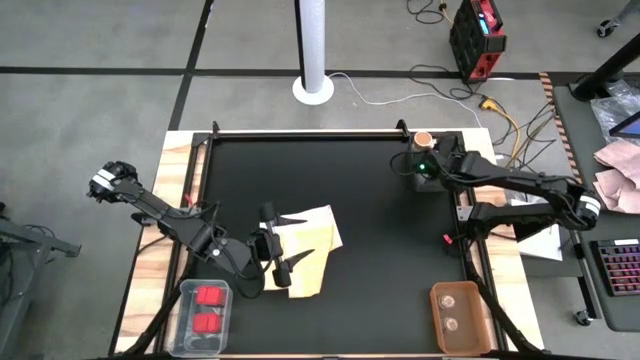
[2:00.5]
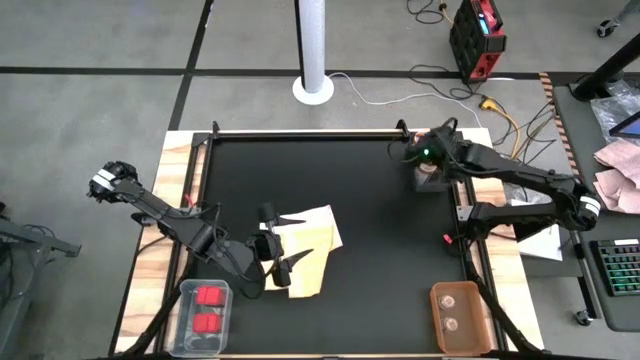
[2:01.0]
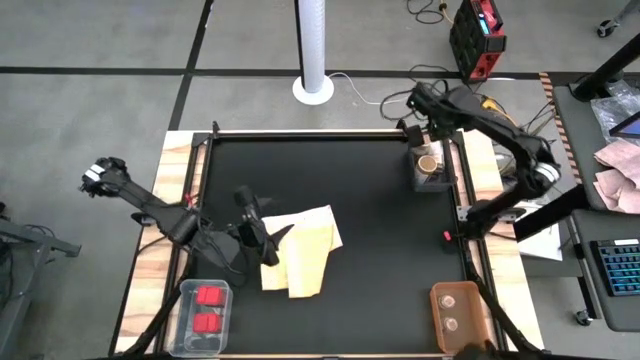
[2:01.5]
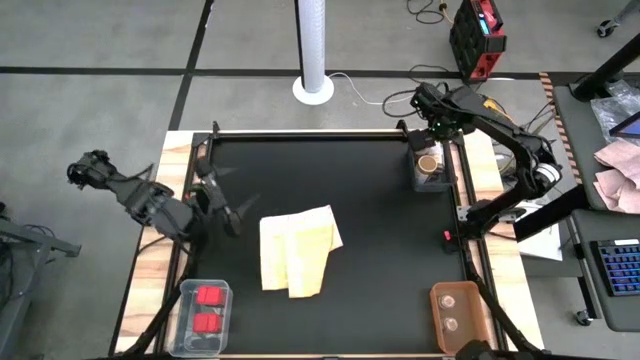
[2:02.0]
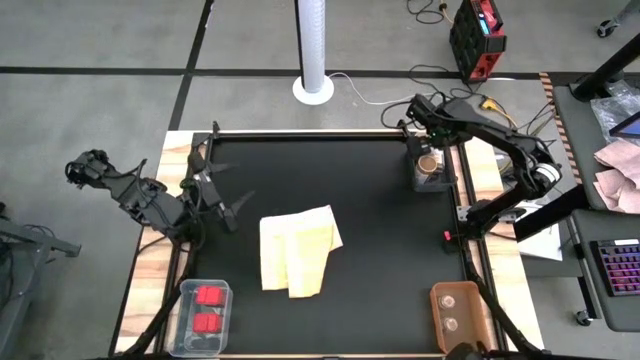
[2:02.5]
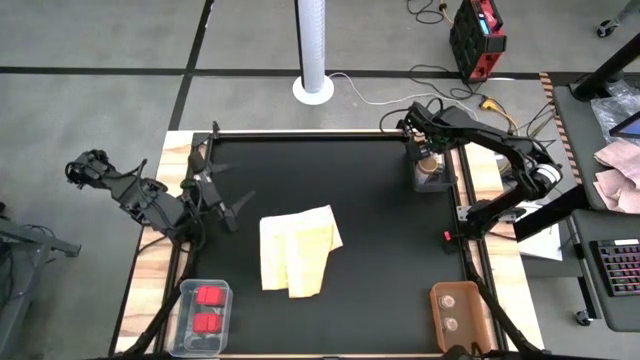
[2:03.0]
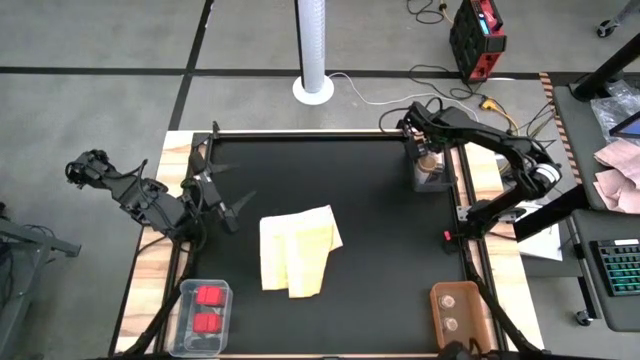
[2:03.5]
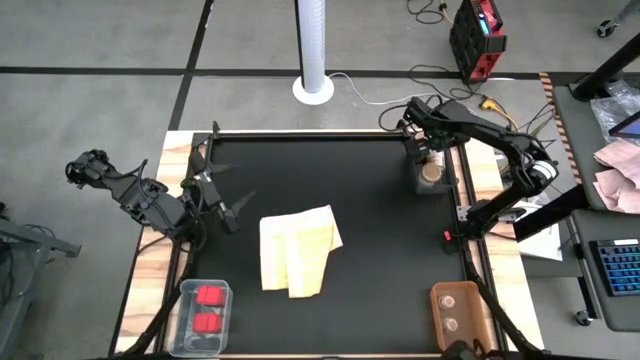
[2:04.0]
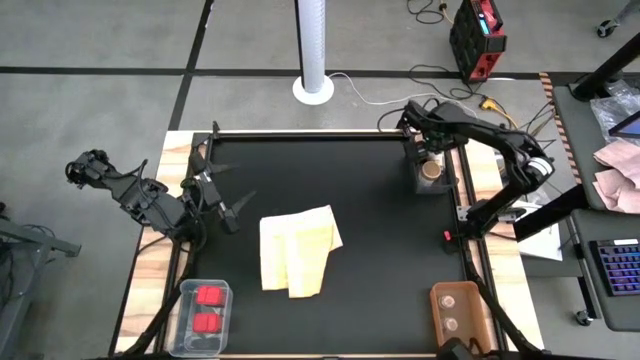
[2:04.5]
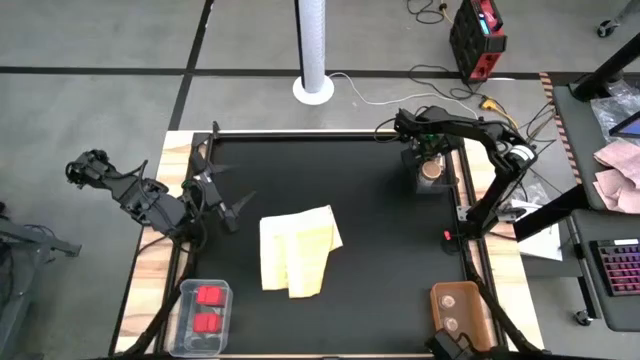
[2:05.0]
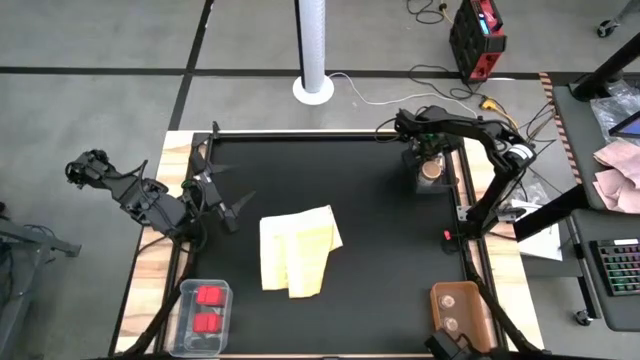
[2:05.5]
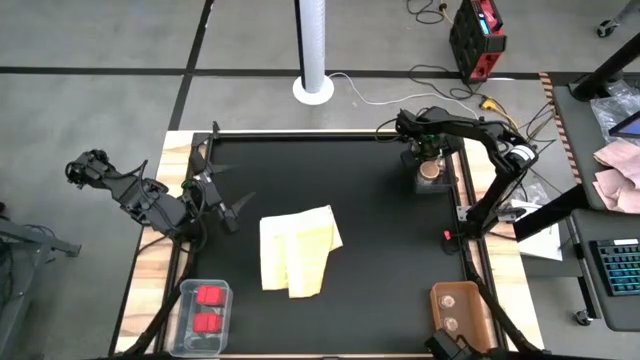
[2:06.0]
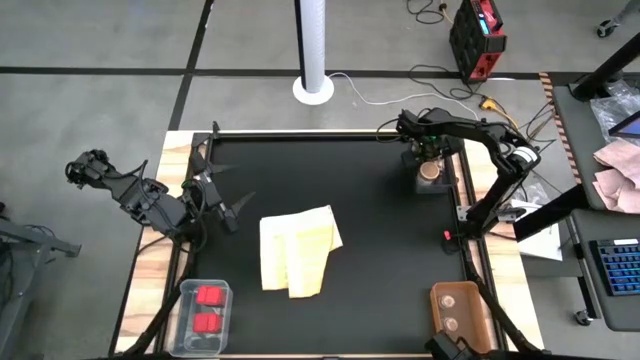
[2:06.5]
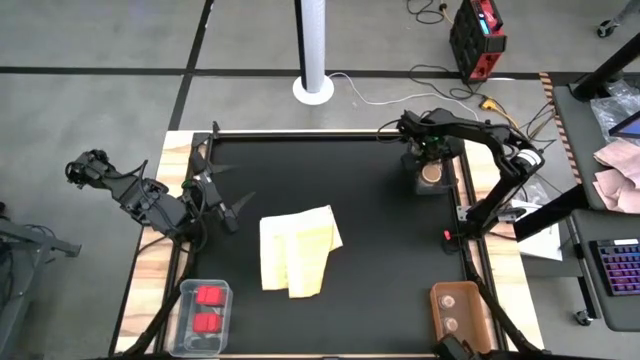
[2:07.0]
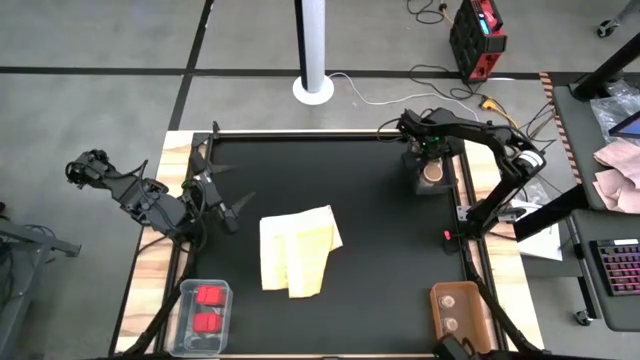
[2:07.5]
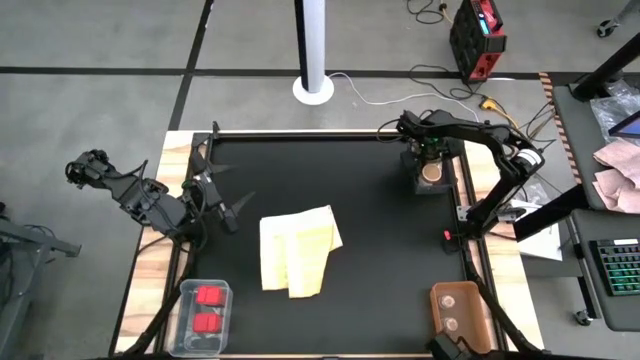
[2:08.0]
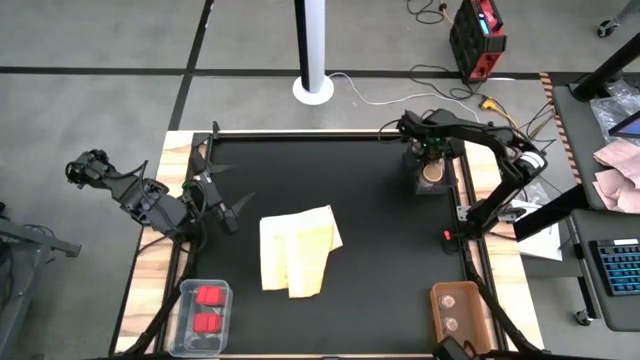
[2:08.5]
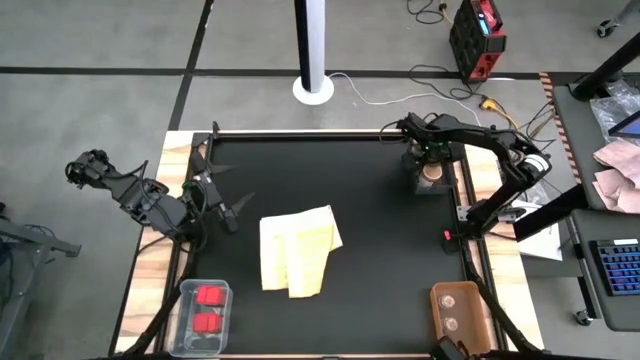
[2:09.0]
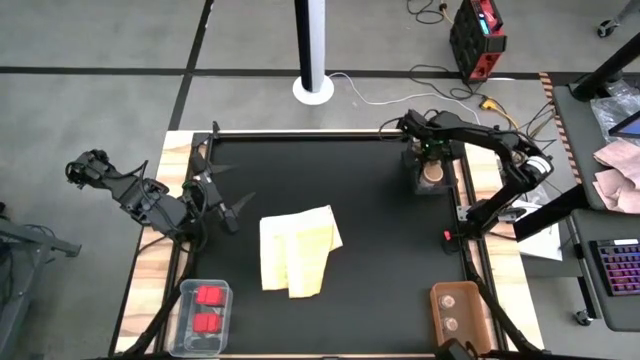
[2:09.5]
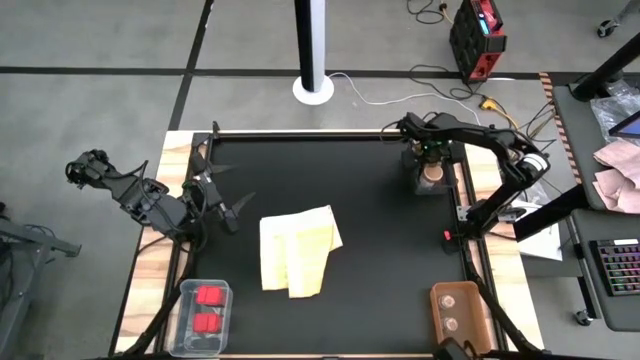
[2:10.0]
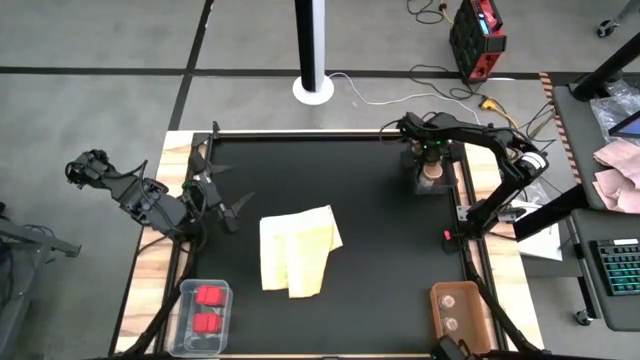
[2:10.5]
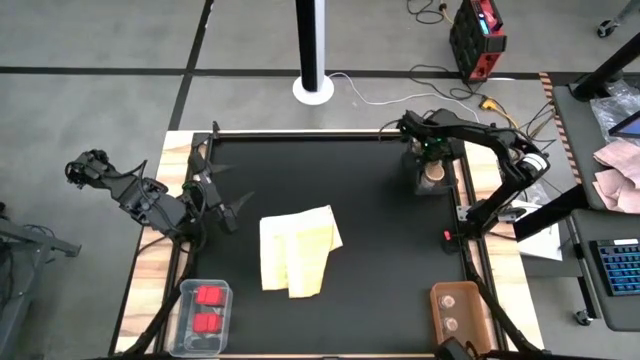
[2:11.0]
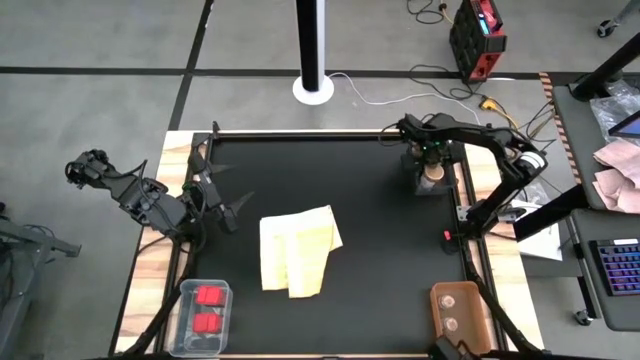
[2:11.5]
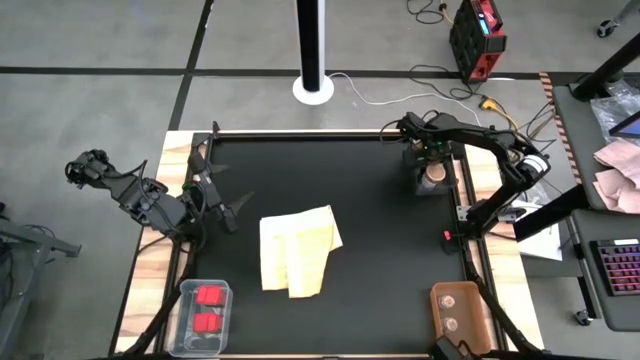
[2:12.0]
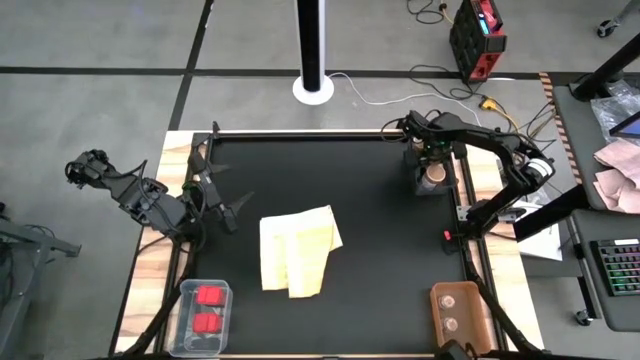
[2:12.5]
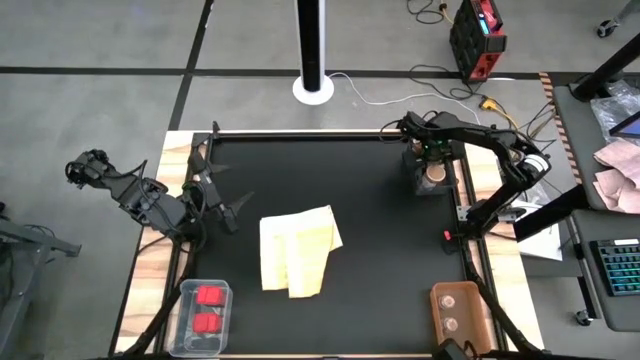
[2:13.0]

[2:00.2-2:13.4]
Task: Sort spices by type
Adjust the golden spice bottles in the black bin

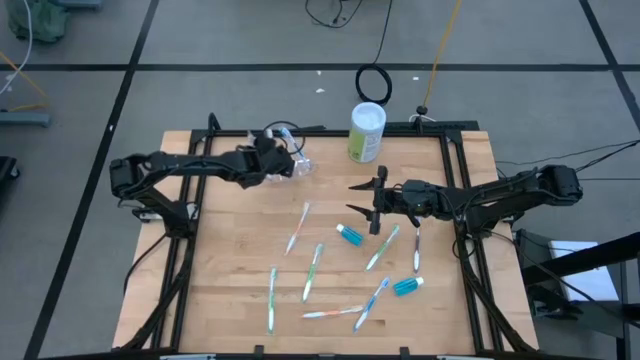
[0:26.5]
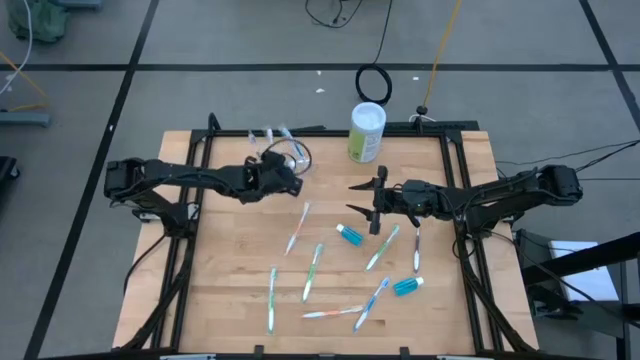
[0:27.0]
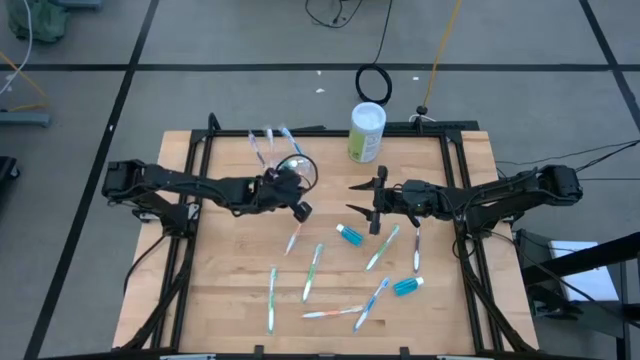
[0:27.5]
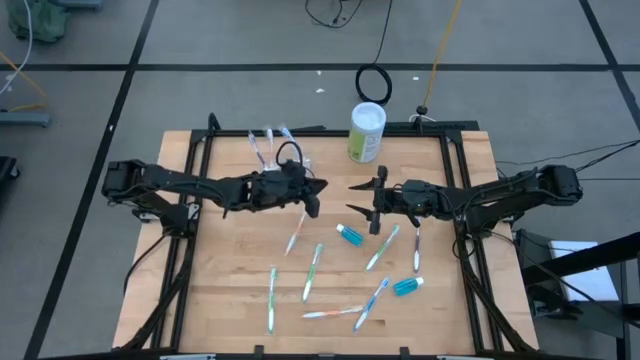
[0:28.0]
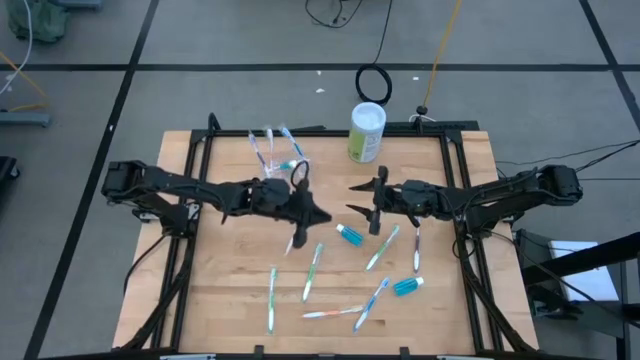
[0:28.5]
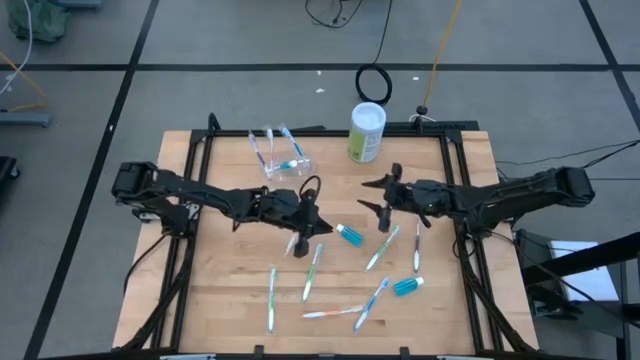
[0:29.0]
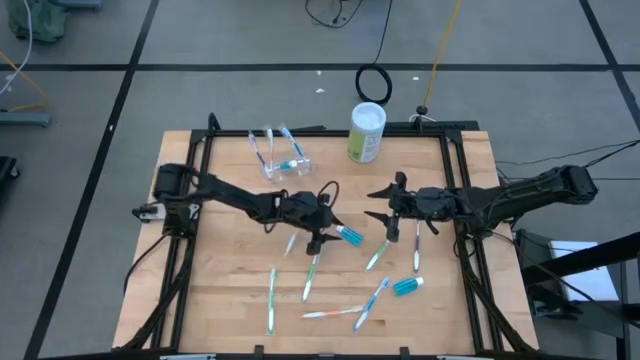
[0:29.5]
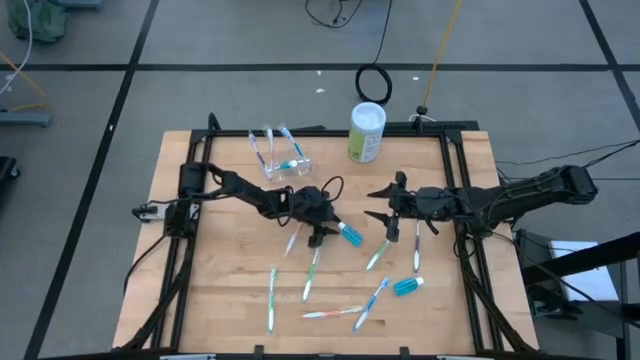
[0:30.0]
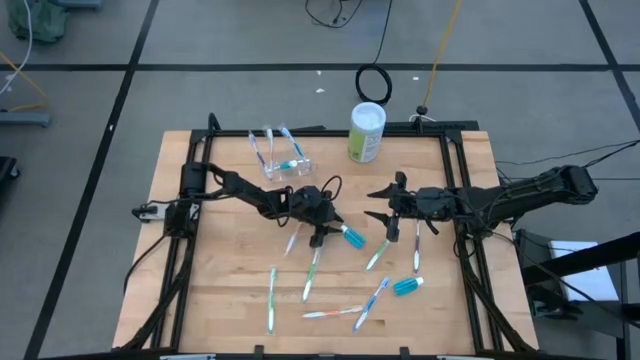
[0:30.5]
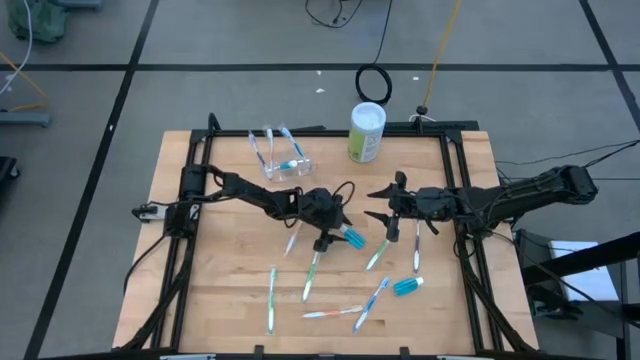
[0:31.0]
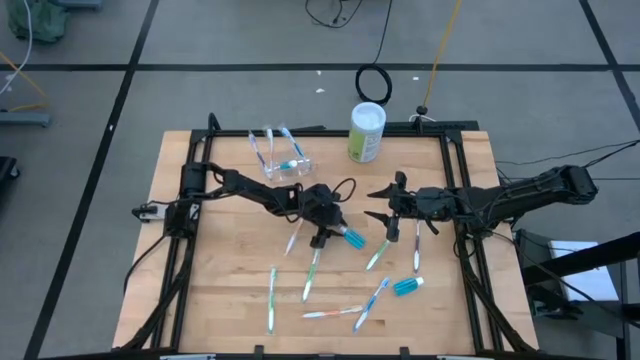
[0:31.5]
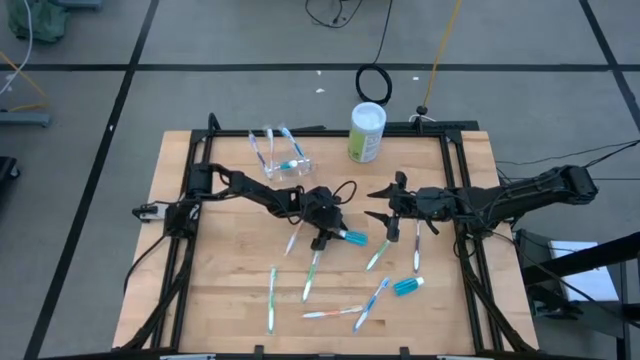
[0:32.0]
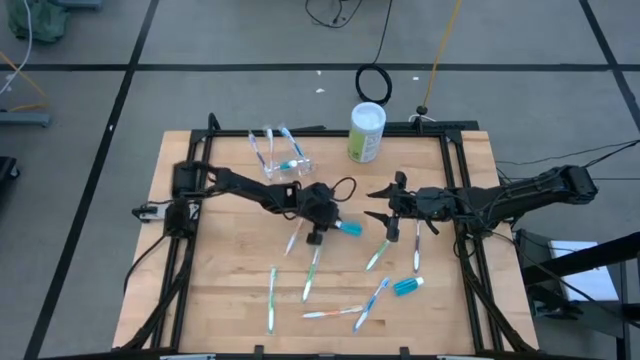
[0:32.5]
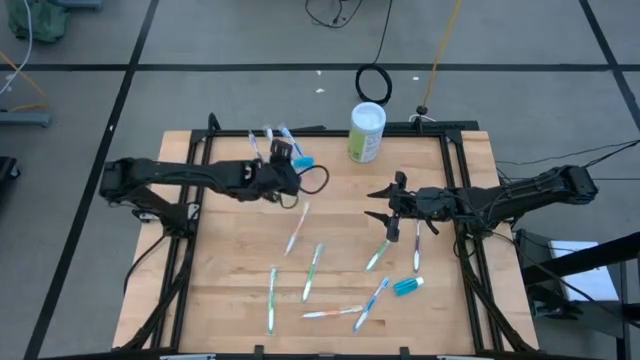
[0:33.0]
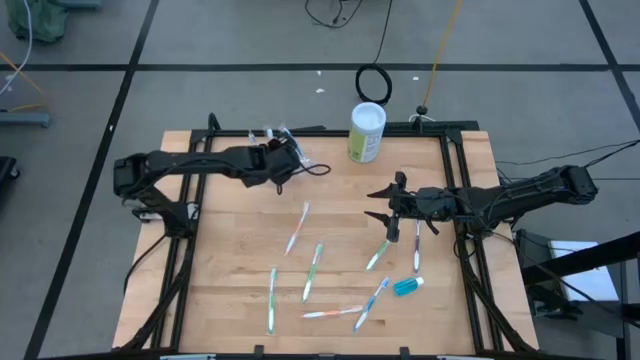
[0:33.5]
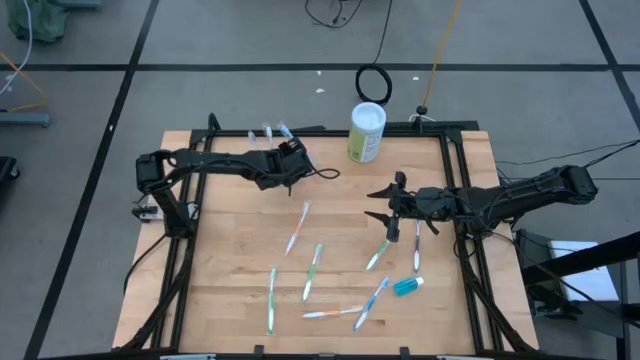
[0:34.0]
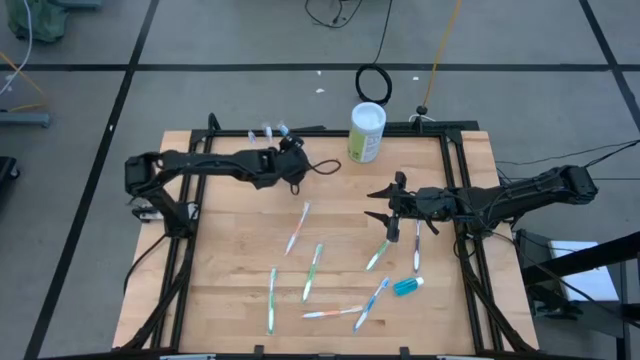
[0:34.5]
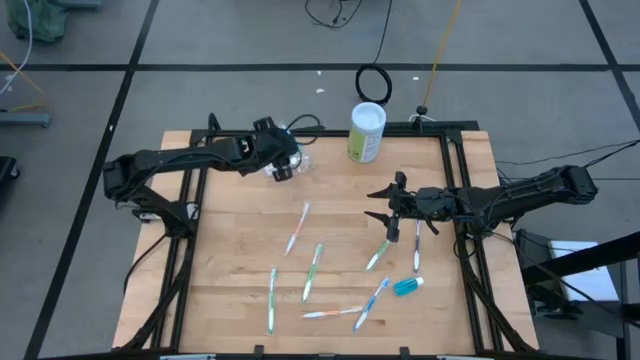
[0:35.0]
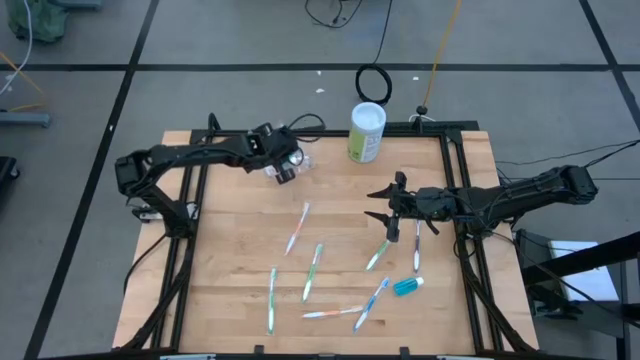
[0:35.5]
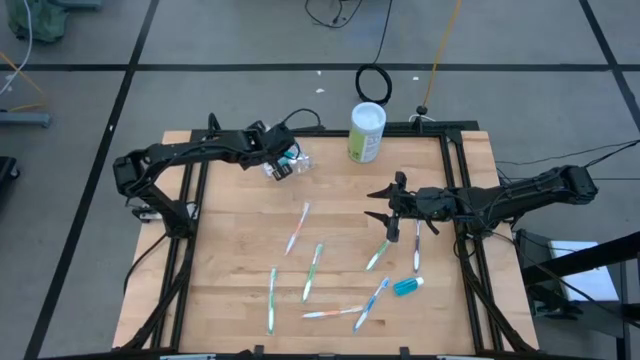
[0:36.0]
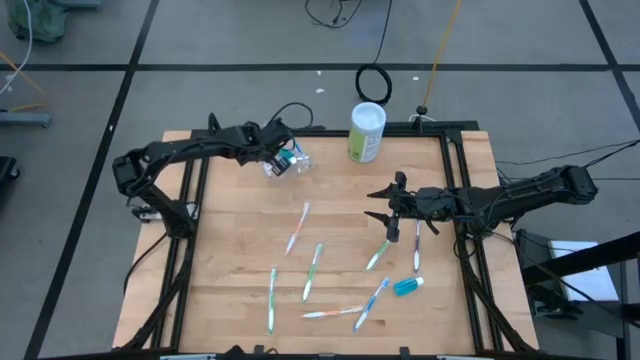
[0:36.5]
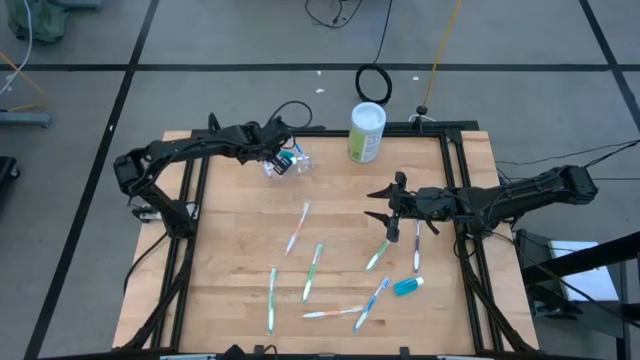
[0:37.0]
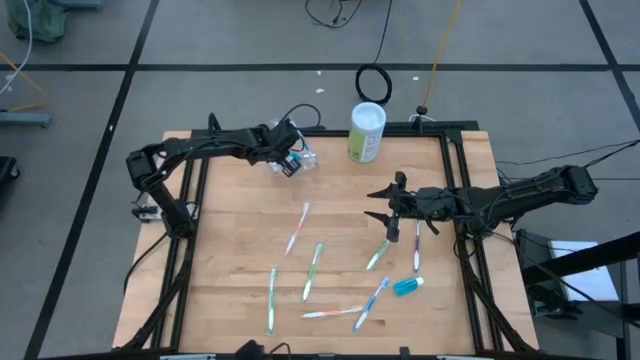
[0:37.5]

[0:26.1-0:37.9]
Task: Pick & Place toothbrushing station
Put the top blue mouthwash into the transparent organizer
